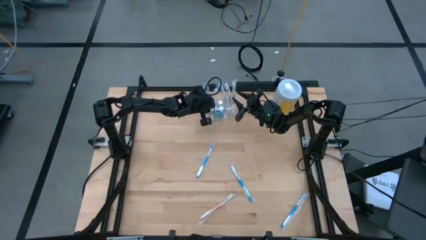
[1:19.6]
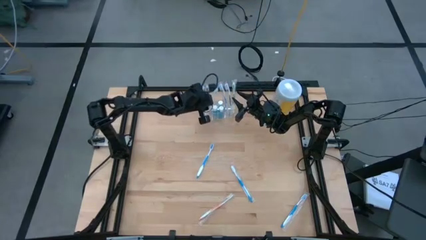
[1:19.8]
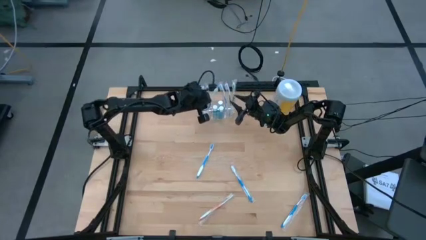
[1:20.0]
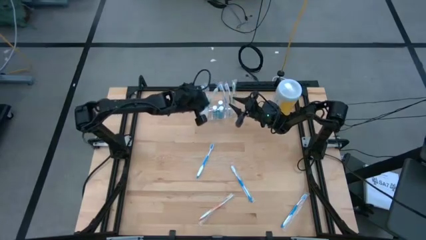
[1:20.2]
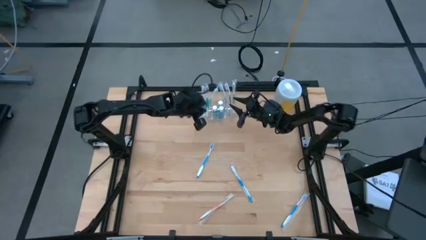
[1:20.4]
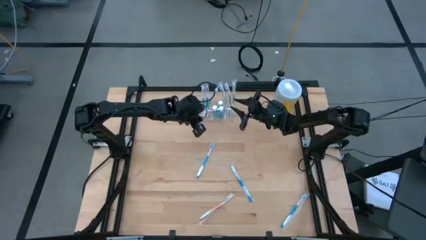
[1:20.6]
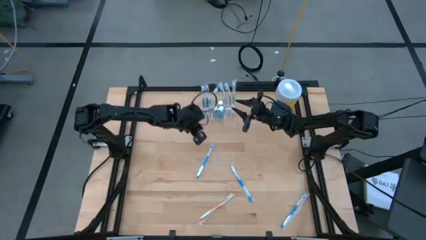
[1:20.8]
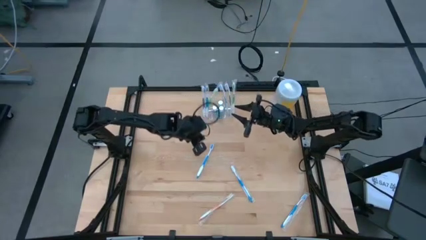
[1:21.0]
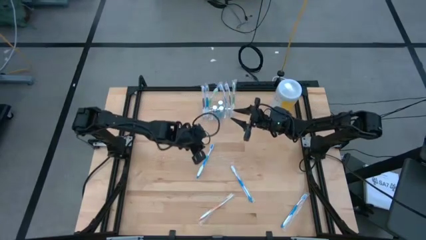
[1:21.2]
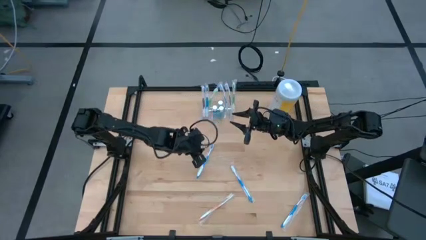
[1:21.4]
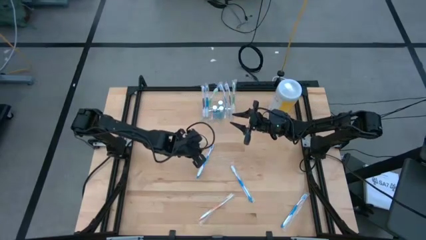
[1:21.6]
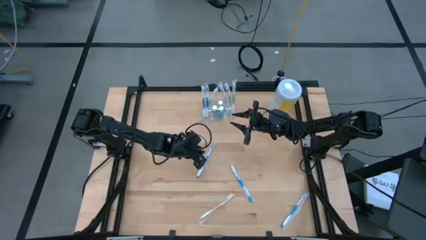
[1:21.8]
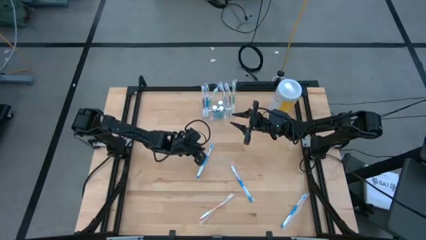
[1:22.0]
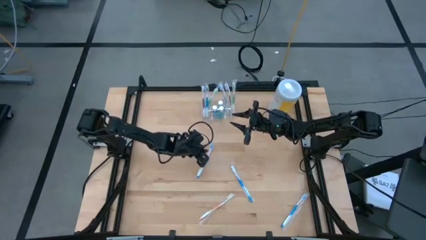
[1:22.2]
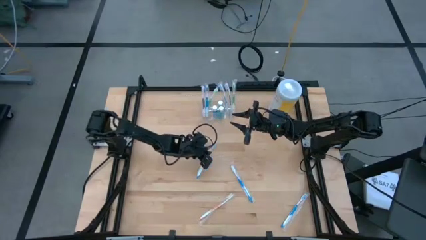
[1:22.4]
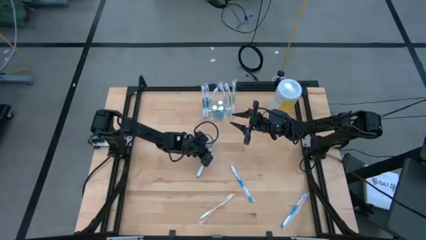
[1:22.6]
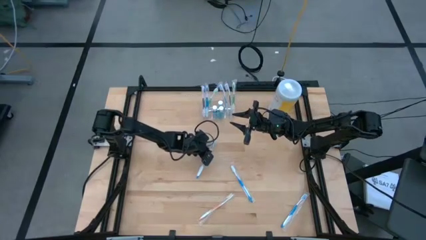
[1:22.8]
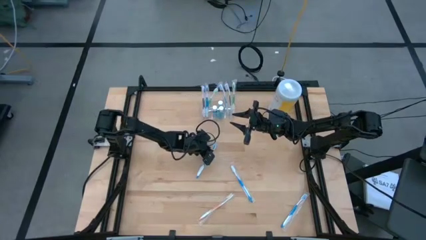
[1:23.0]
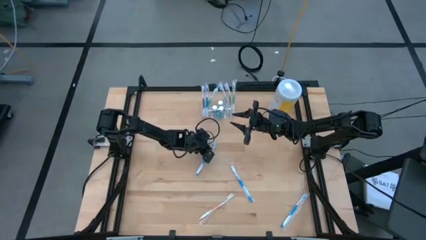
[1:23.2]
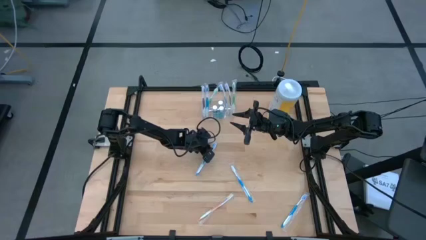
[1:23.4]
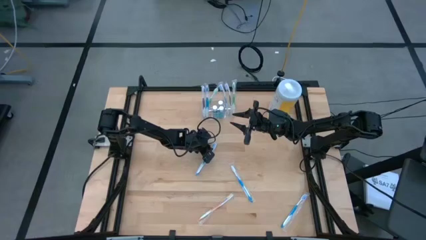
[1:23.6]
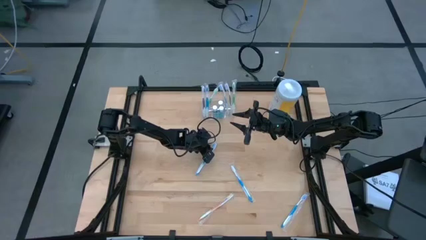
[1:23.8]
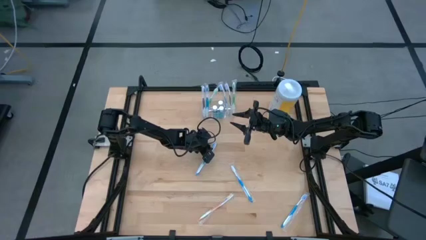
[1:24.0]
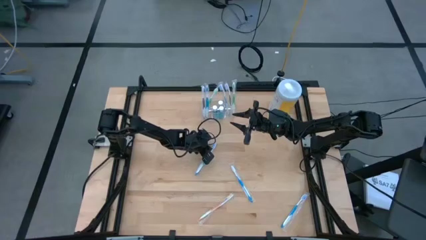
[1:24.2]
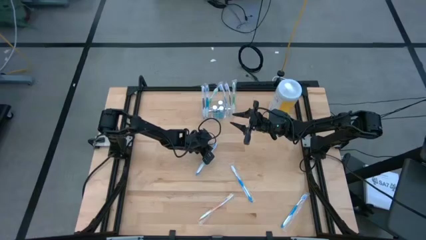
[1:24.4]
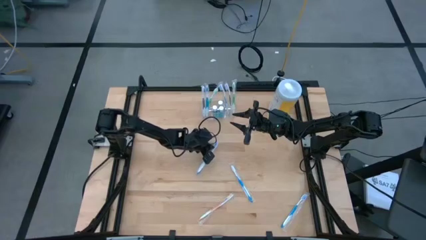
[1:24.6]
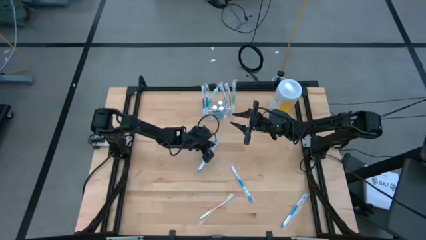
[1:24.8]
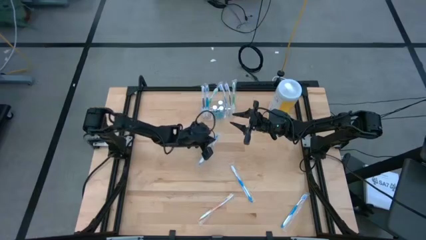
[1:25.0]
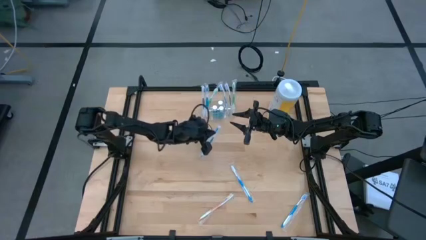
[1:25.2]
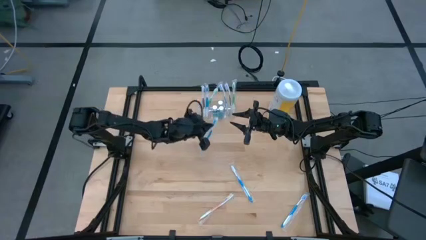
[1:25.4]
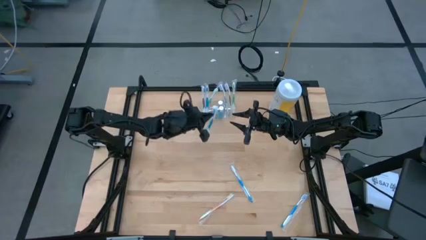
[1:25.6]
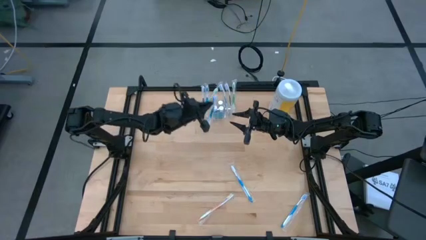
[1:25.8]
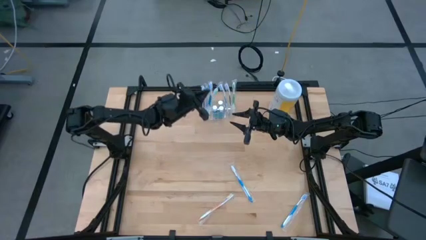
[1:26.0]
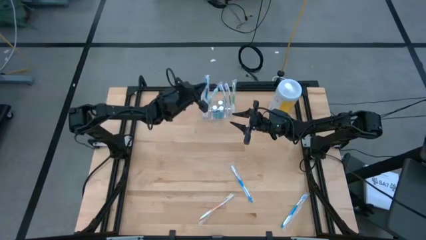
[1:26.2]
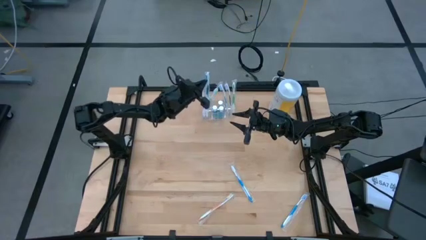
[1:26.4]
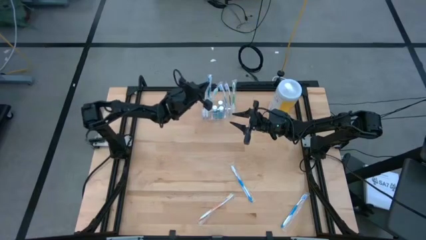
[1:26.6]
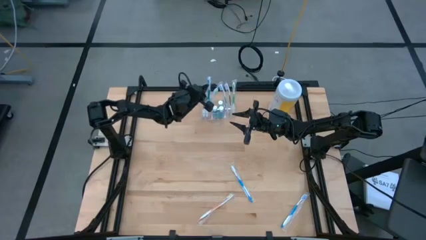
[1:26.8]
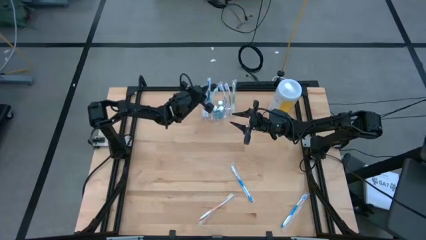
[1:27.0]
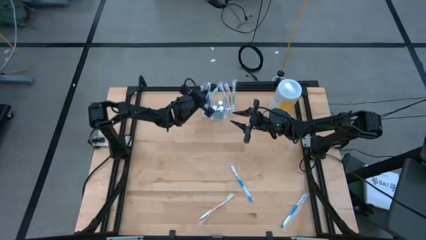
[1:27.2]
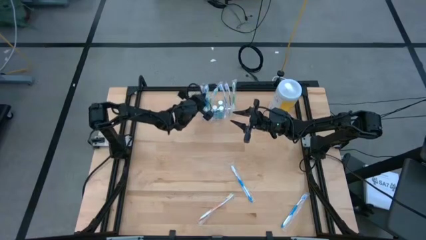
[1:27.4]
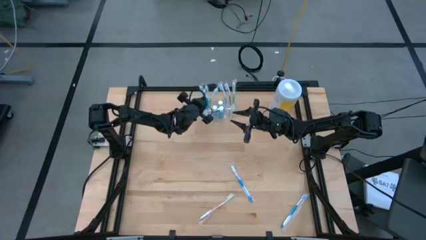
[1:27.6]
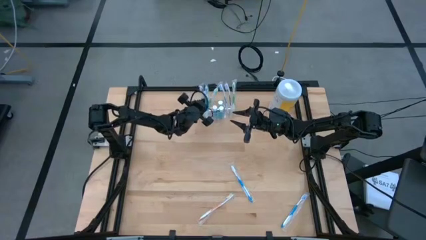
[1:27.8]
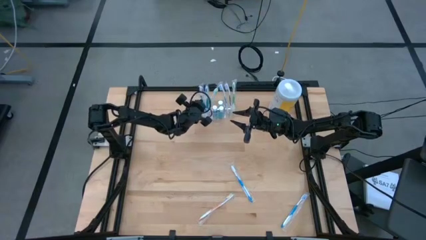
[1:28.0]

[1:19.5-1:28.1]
Task: Pick & Place toothbrushing station
Put the blue toothbrush into the transparent organizer

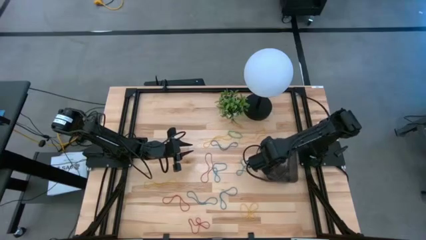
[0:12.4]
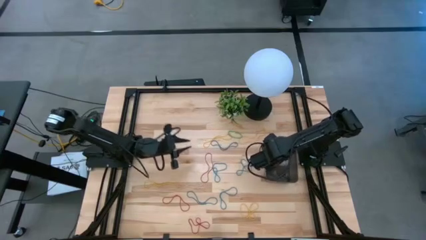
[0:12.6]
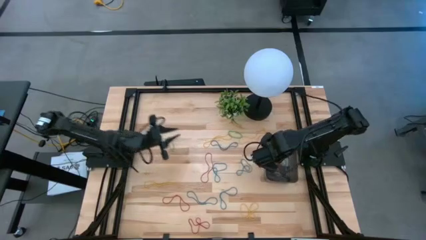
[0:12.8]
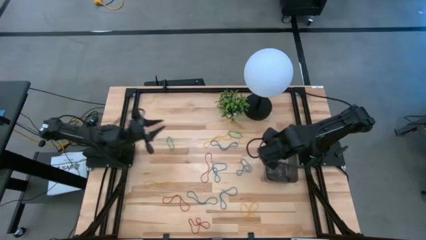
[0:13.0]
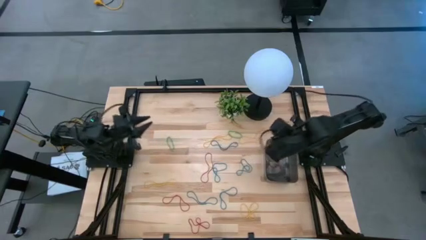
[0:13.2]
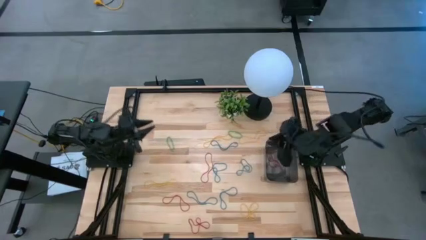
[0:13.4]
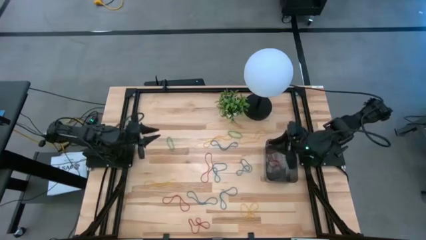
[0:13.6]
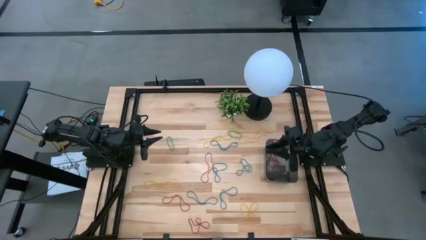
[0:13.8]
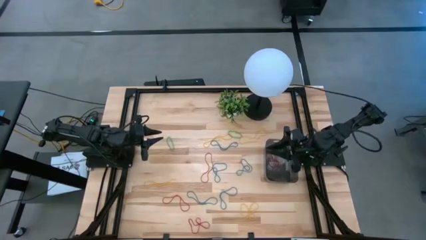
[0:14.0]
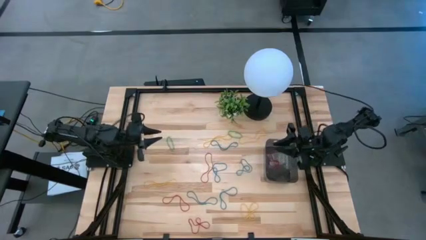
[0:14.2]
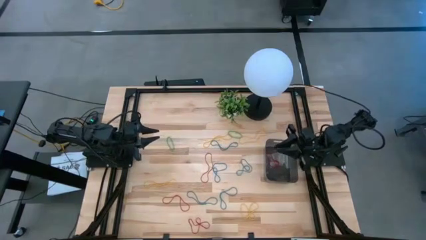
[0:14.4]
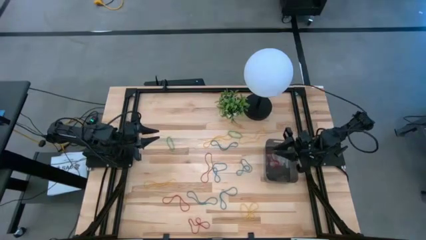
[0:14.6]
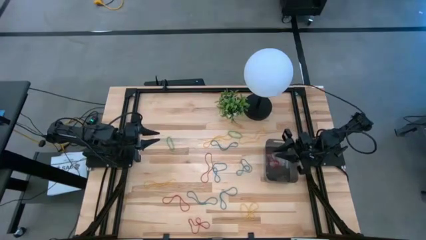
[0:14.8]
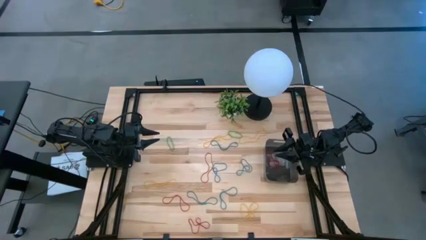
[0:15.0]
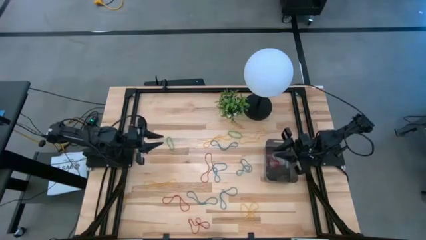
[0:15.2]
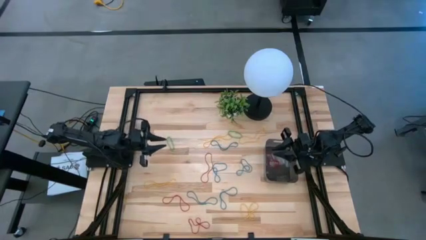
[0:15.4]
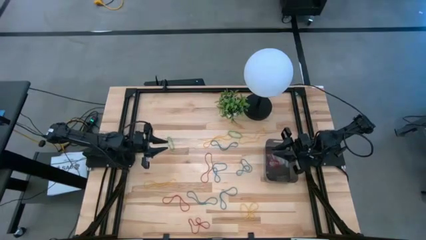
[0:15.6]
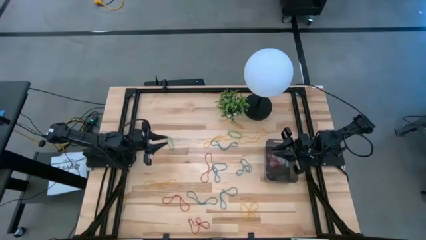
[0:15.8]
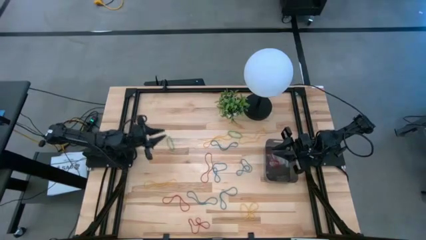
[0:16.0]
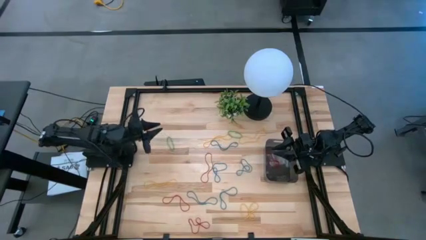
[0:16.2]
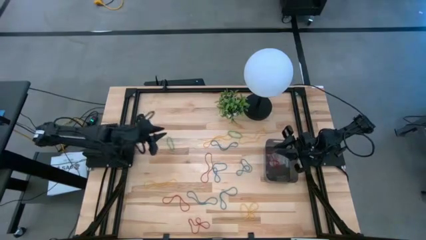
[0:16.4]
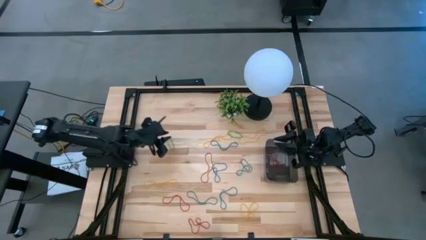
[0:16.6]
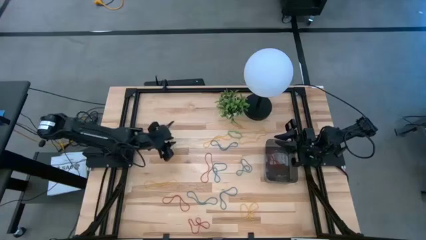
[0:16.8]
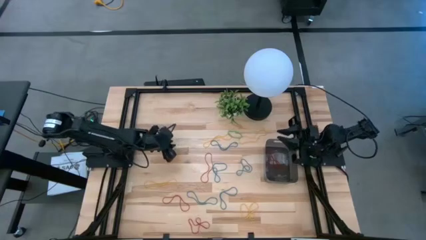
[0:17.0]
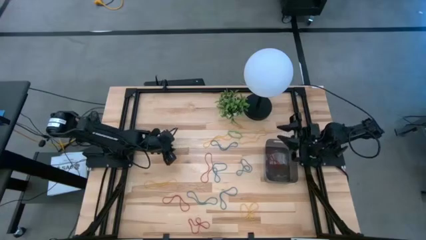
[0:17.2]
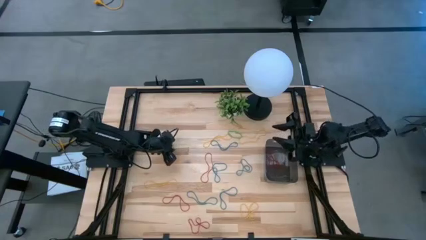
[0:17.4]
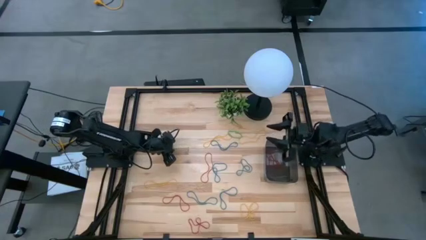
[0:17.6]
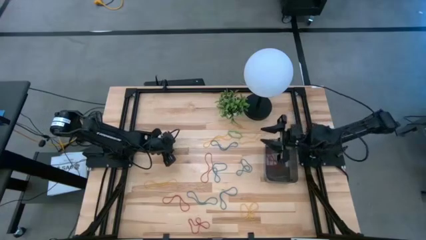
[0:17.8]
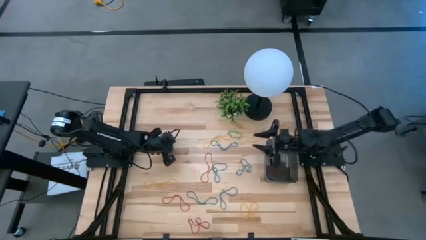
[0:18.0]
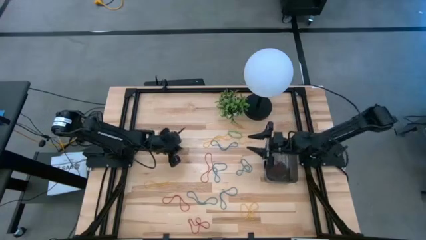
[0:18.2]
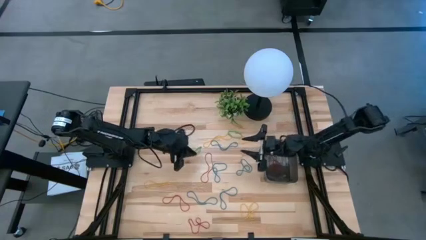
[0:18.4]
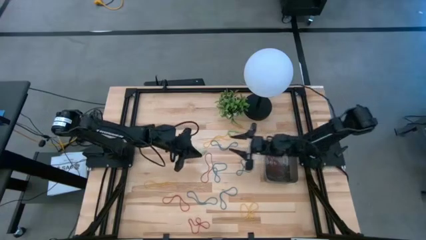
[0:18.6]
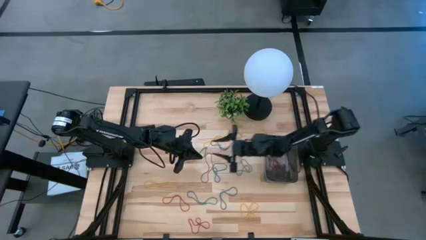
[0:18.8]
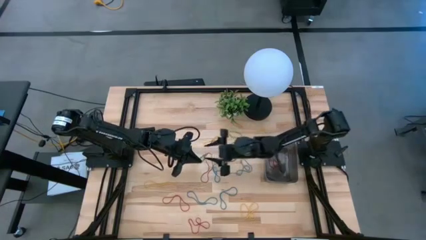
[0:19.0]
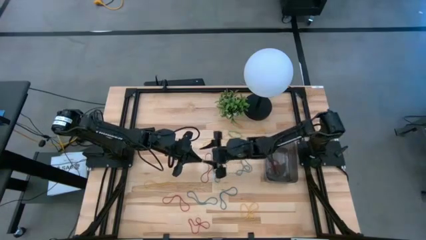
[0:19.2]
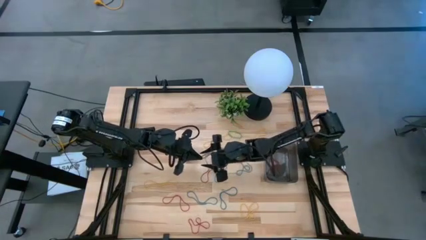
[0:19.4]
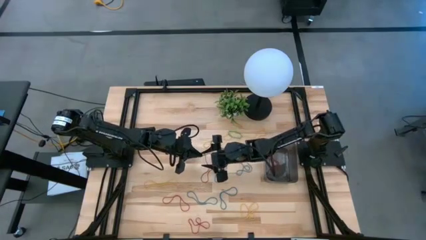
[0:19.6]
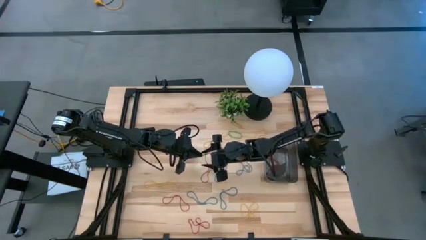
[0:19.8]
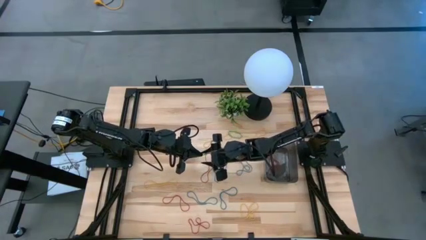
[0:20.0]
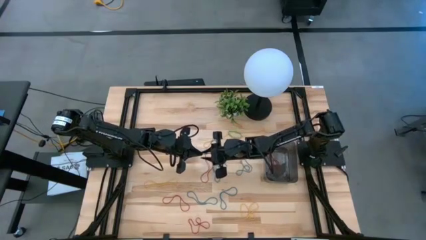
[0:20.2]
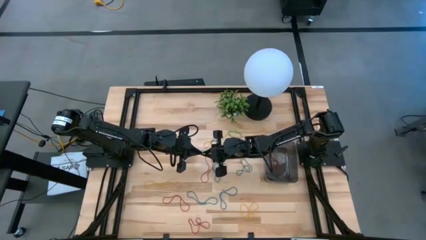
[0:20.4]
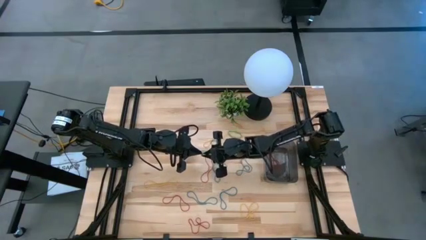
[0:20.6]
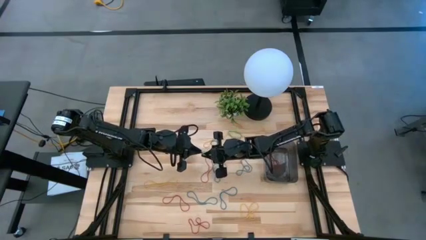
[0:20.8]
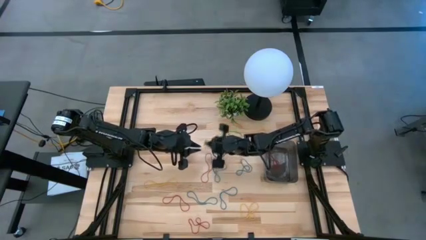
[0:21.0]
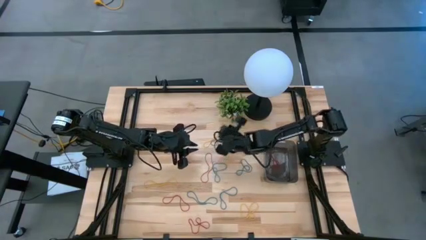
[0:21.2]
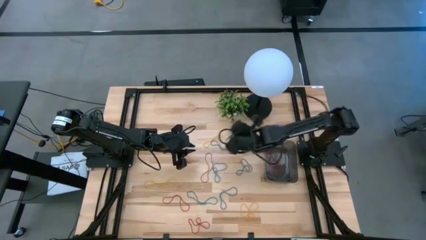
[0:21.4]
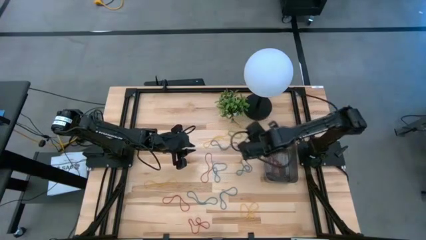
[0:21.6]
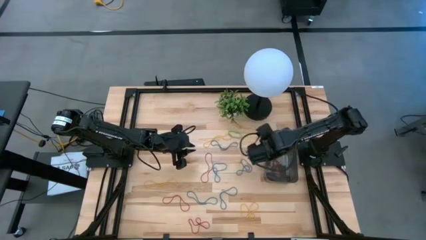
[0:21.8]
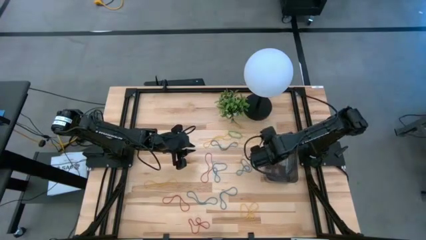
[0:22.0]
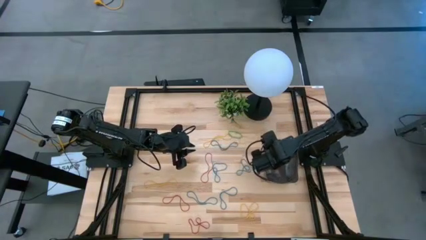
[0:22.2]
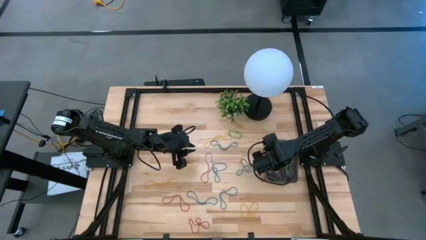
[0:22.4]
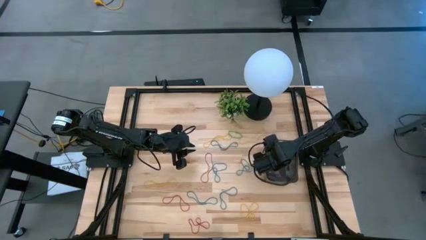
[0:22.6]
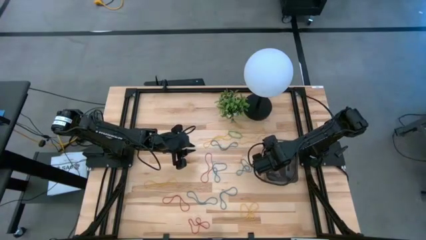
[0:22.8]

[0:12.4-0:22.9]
Task: Pick and place items into bin
Put the left green rubber band into the black transparent bin
